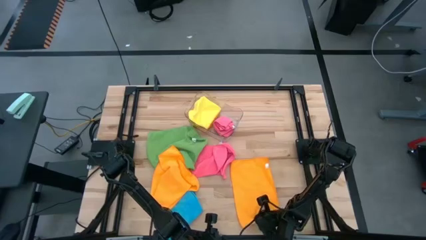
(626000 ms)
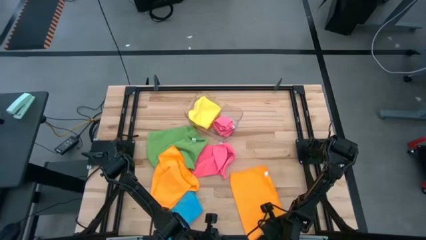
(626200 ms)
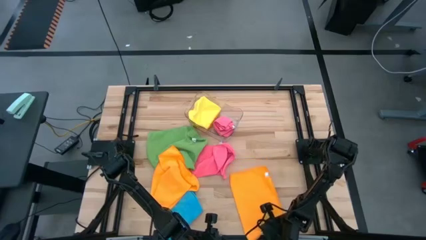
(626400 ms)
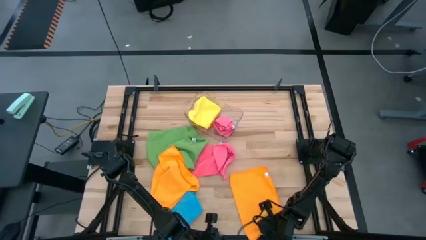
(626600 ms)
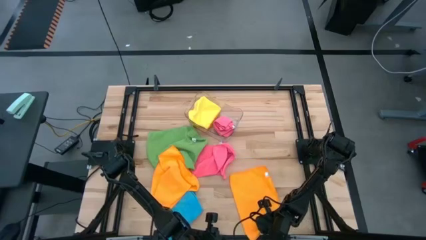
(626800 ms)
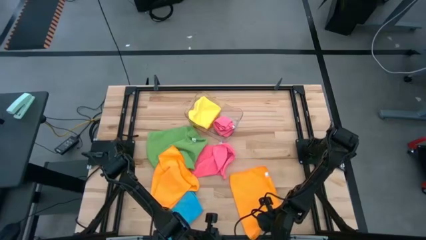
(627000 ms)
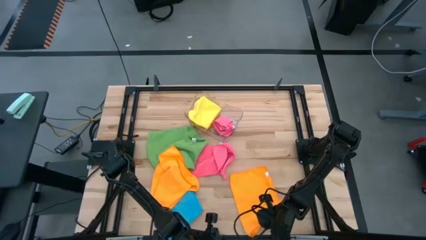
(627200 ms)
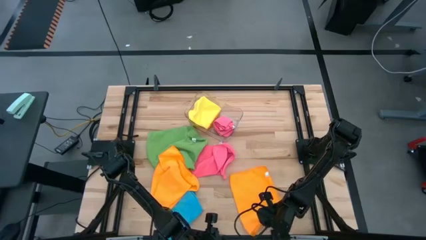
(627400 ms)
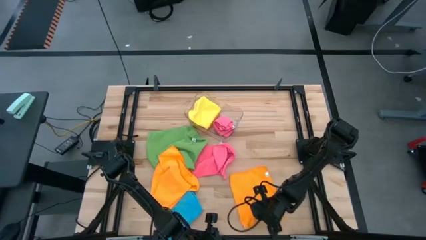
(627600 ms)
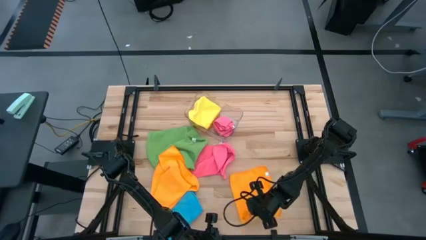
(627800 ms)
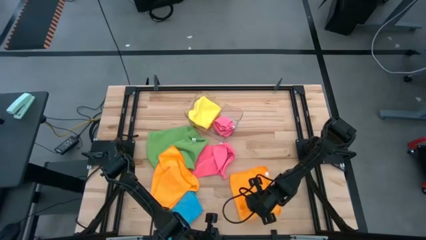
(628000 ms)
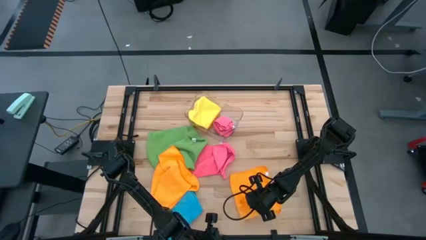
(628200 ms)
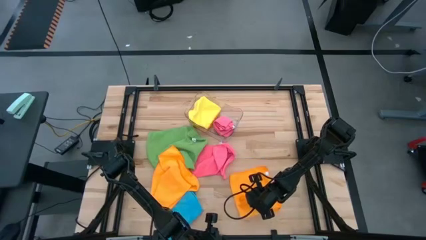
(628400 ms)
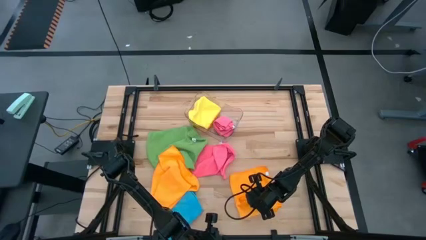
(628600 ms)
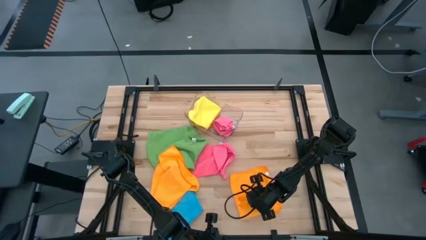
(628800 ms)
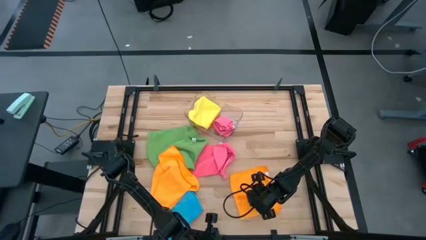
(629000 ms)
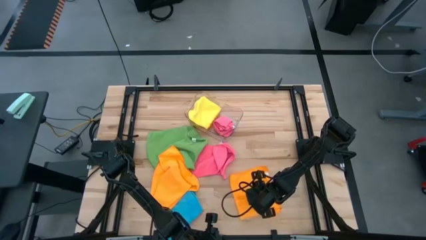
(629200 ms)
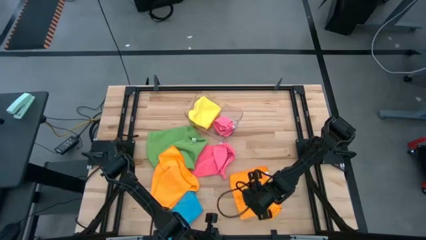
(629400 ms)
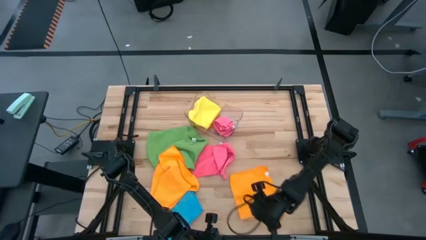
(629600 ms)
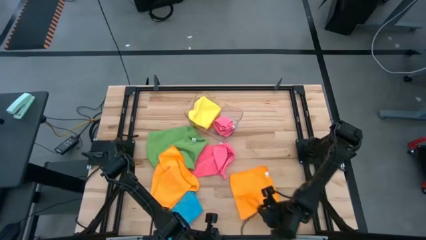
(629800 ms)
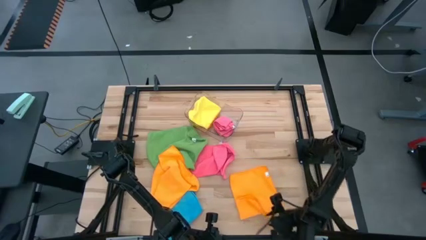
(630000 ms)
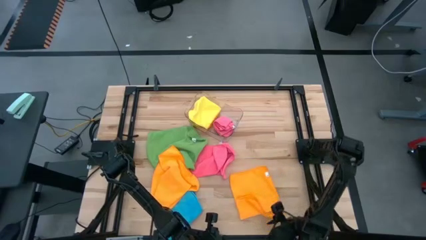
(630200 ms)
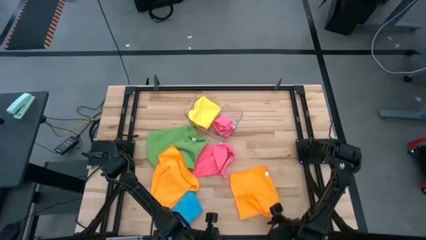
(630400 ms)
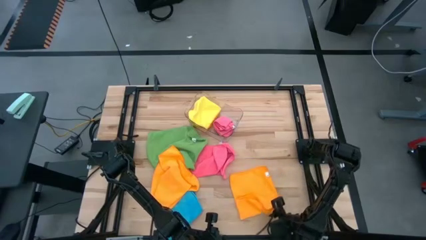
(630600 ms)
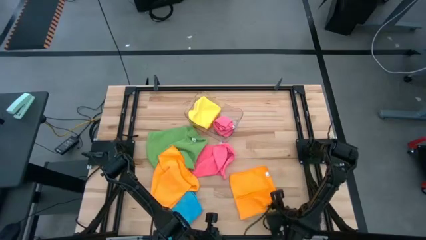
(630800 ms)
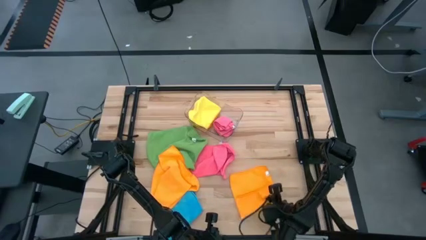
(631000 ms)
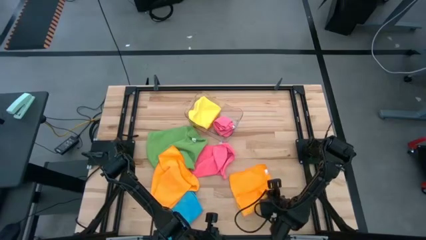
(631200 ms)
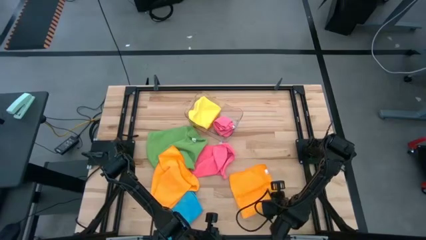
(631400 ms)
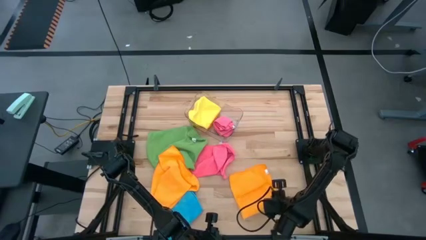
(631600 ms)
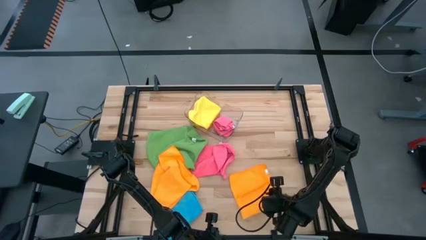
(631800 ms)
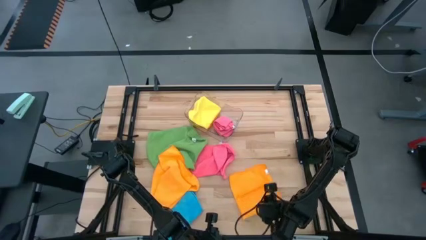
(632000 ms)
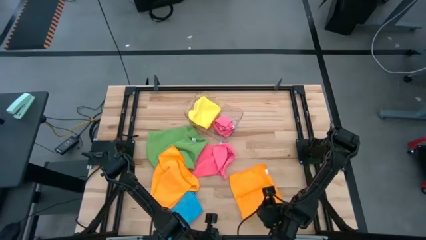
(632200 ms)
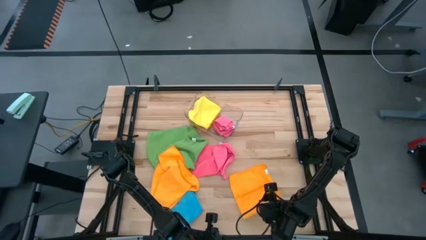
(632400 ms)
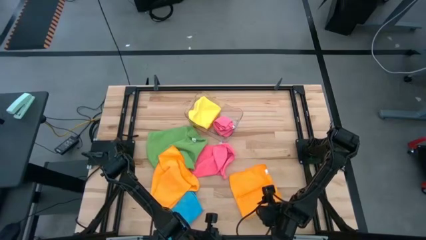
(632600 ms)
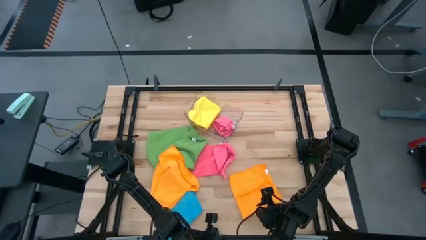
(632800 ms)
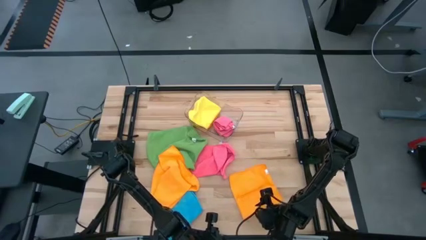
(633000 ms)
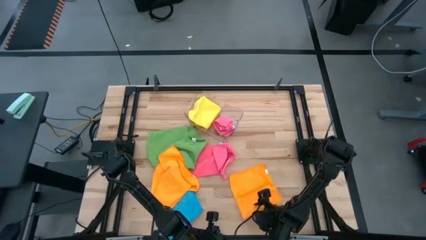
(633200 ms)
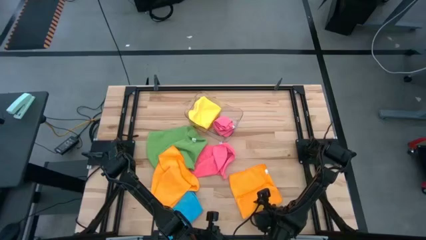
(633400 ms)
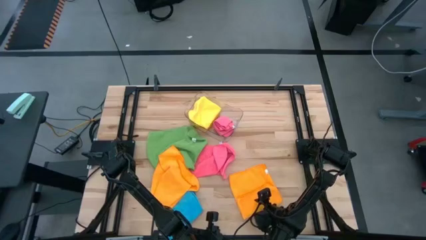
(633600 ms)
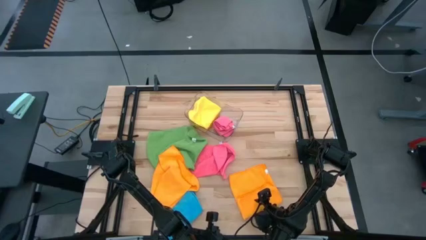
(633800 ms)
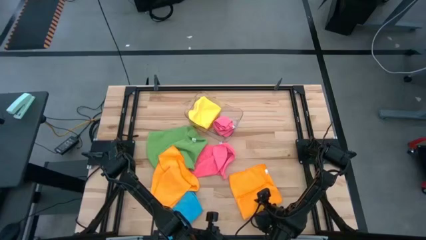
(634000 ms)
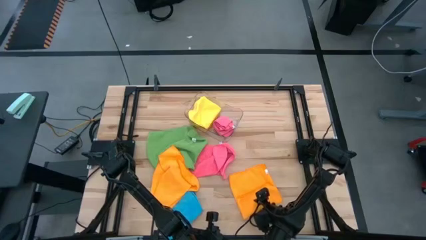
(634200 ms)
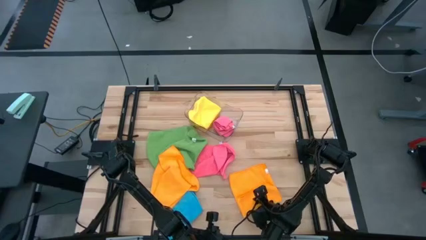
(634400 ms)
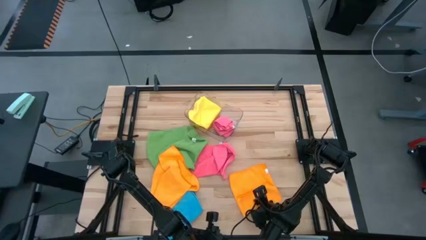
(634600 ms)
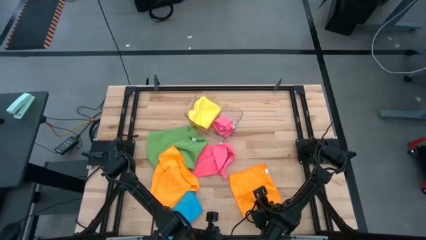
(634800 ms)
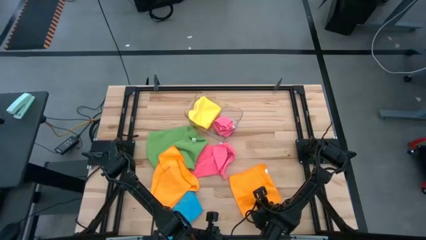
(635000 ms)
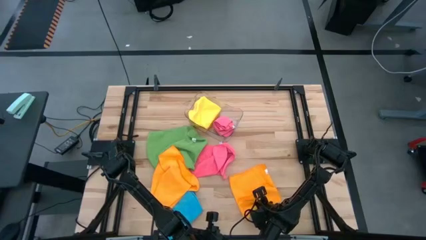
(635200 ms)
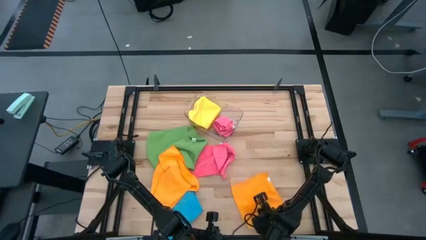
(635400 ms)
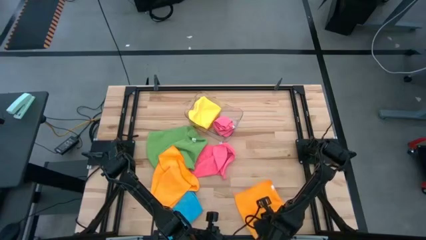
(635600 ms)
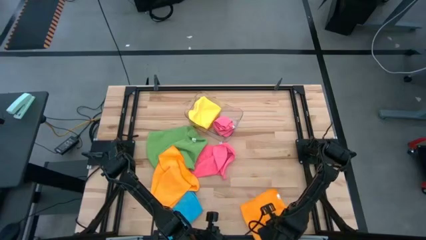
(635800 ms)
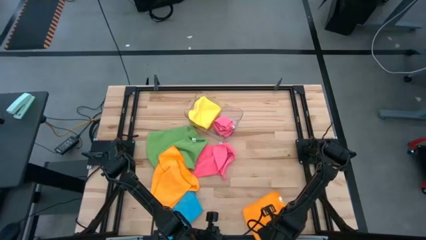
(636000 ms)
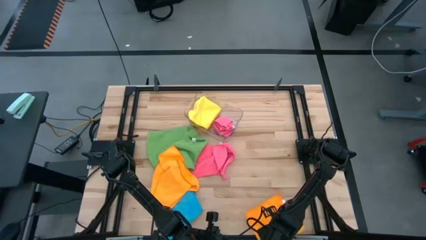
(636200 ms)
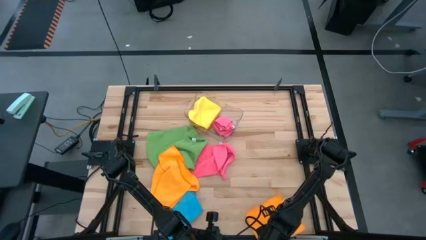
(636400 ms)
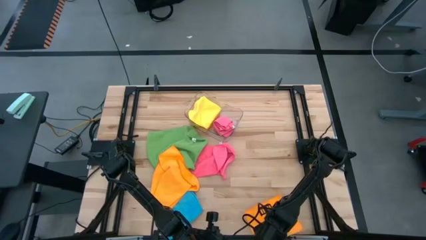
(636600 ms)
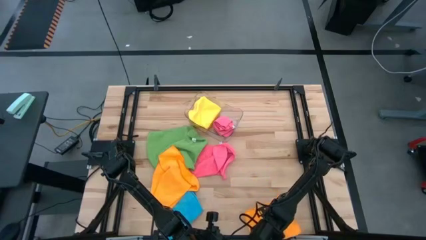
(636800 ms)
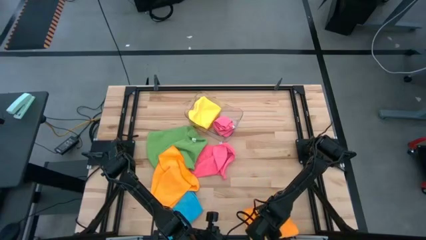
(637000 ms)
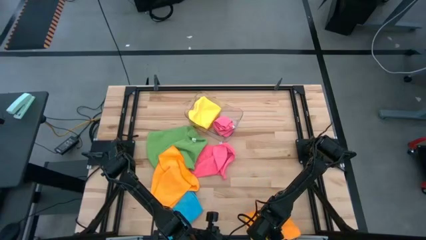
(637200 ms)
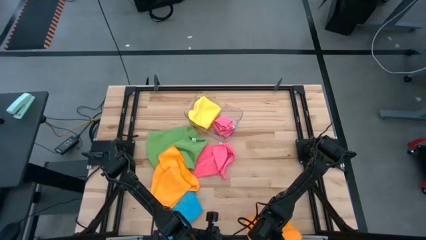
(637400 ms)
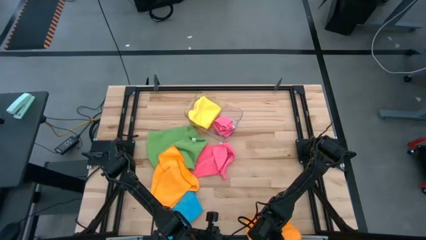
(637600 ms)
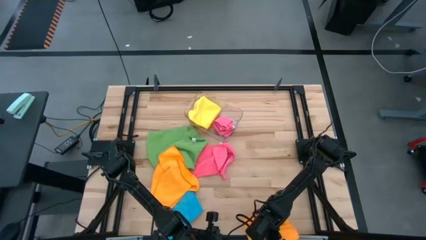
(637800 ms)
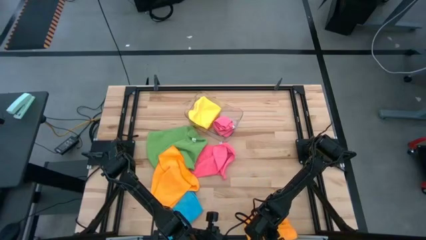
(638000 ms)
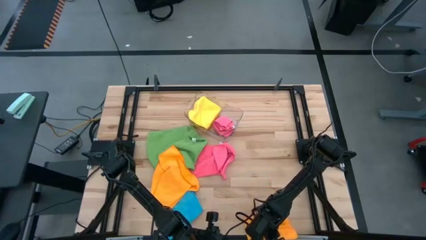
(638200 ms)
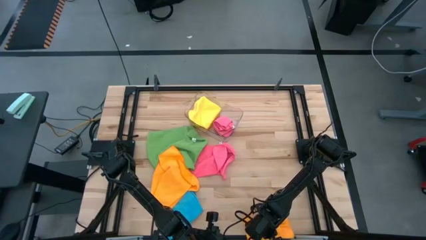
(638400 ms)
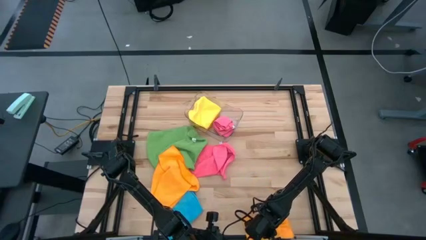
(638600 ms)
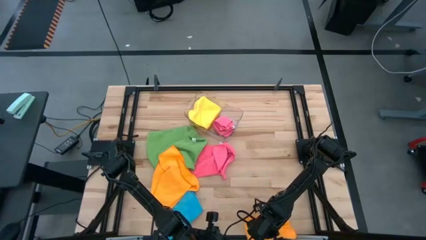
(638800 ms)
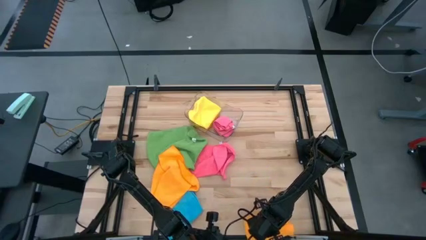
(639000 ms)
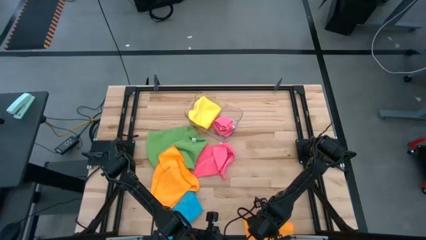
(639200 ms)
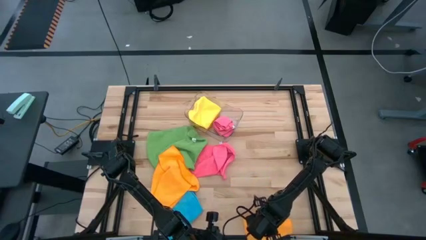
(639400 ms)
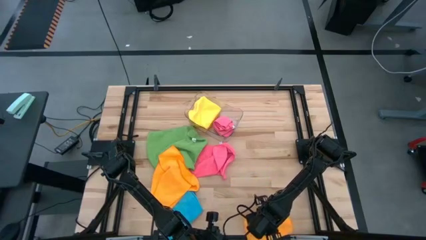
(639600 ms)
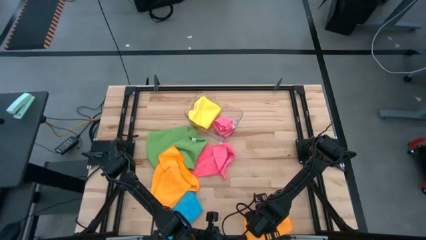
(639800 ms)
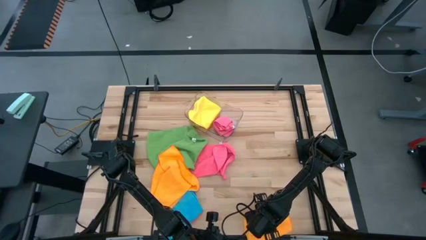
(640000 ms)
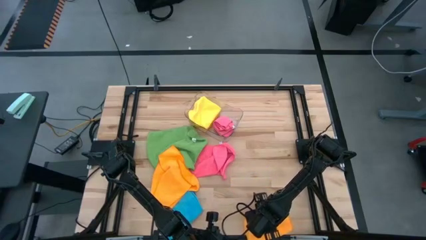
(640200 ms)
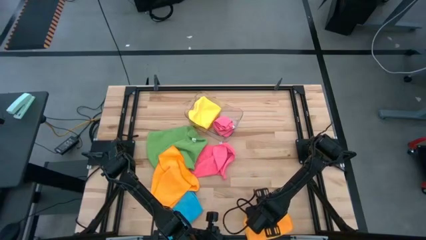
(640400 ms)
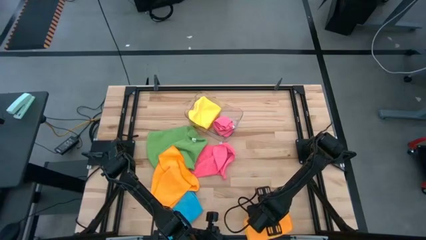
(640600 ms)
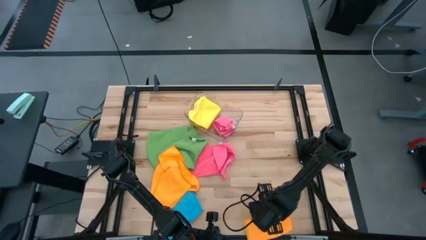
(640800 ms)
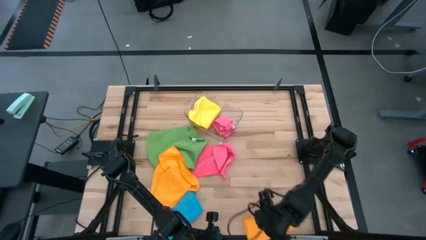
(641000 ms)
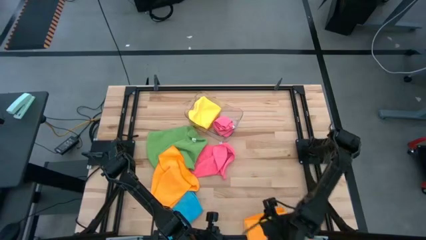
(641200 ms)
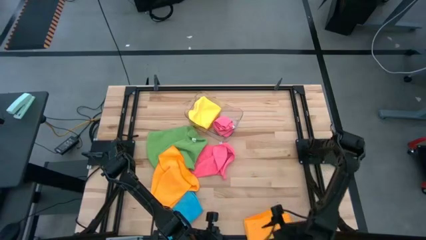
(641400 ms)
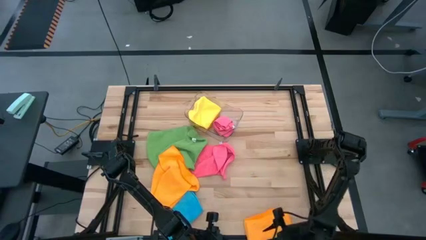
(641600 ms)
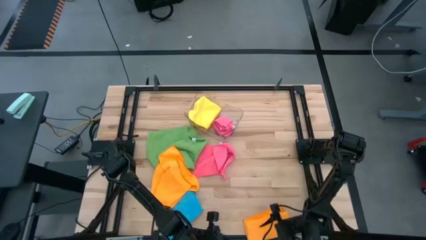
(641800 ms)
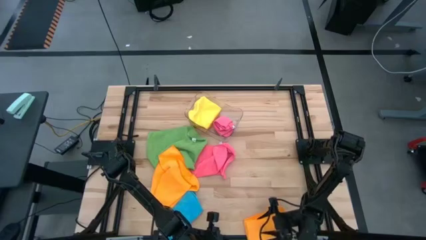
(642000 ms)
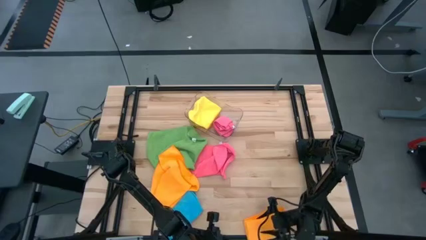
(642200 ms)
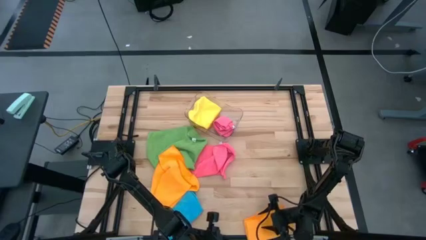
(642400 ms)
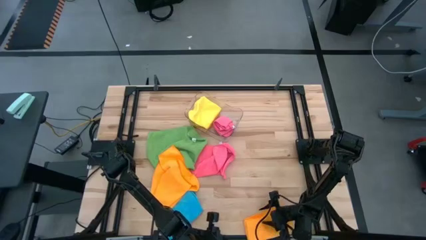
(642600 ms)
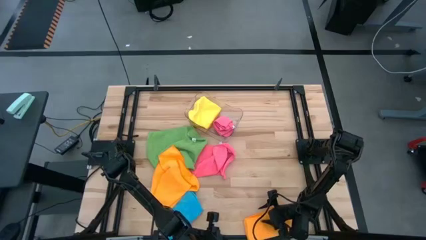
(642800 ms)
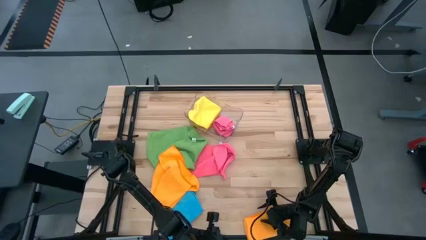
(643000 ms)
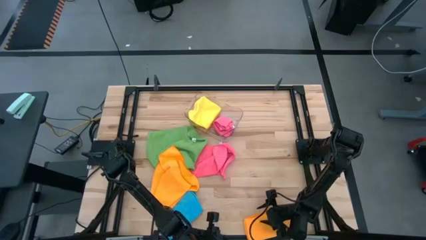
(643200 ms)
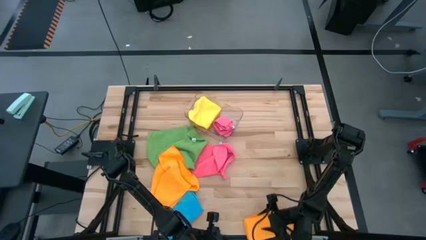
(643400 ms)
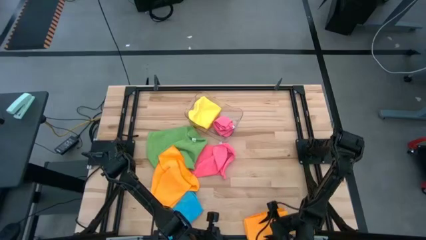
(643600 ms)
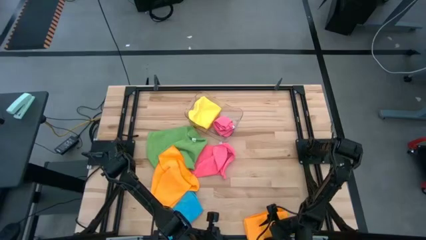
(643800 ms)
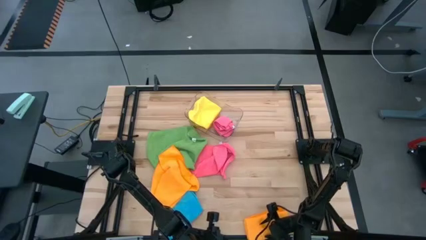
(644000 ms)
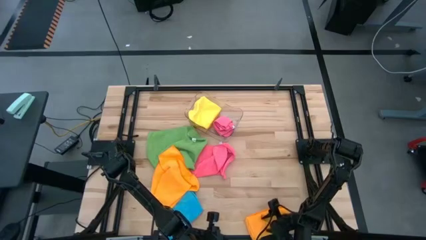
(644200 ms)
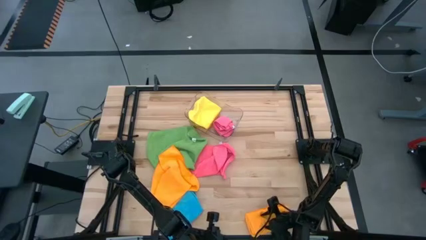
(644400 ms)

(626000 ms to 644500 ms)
Task: Fold microfiber towels
Fold the right orange microfiber cloth
